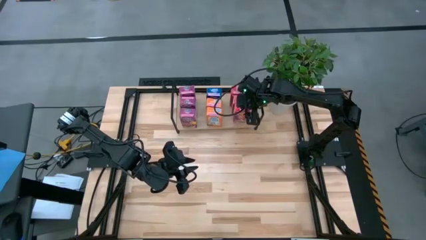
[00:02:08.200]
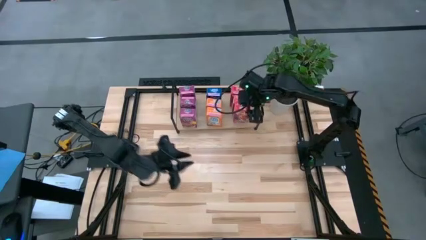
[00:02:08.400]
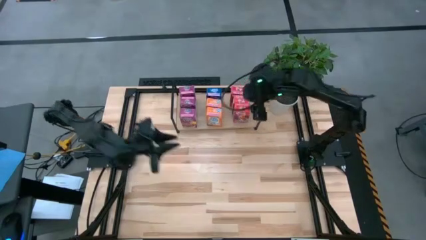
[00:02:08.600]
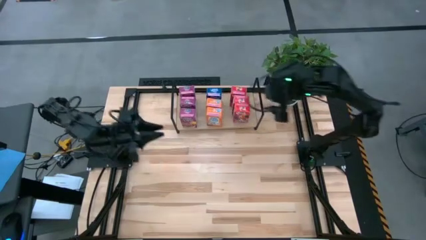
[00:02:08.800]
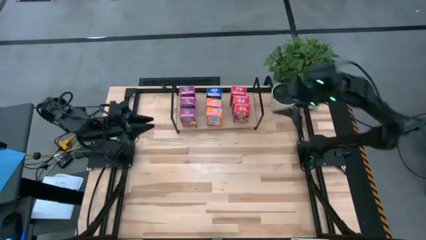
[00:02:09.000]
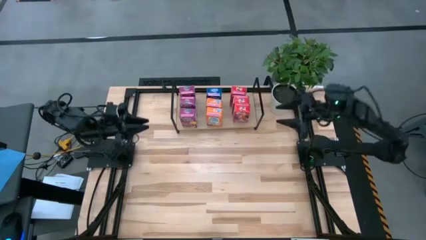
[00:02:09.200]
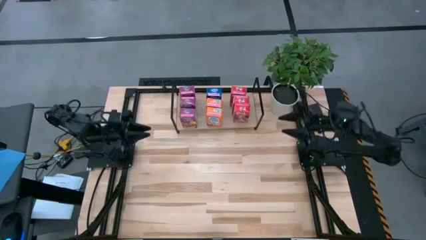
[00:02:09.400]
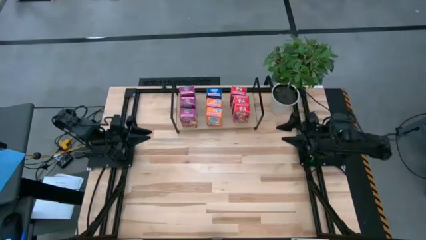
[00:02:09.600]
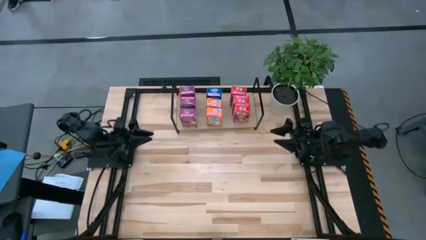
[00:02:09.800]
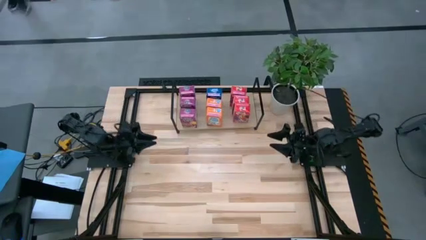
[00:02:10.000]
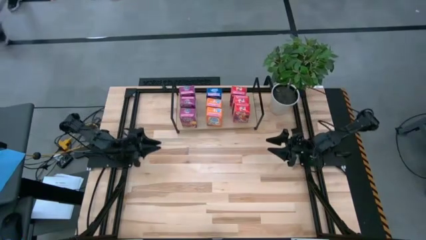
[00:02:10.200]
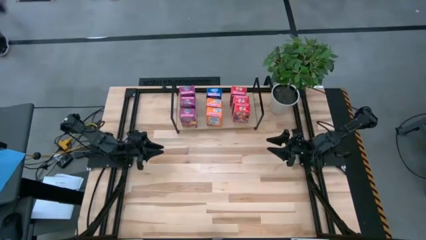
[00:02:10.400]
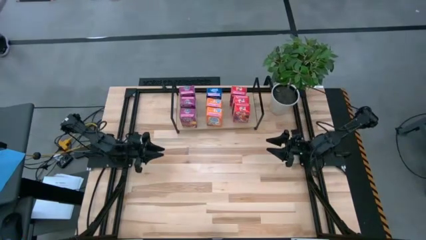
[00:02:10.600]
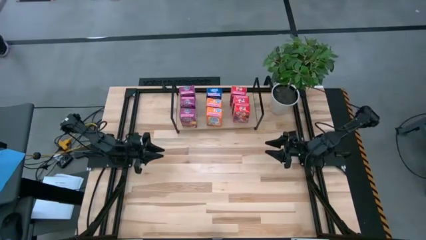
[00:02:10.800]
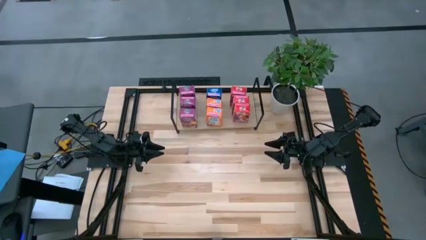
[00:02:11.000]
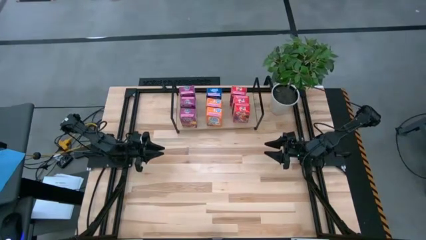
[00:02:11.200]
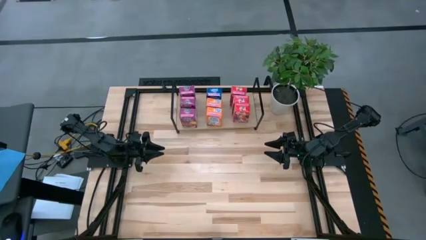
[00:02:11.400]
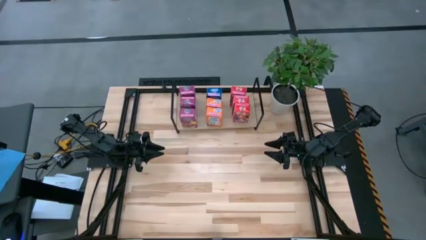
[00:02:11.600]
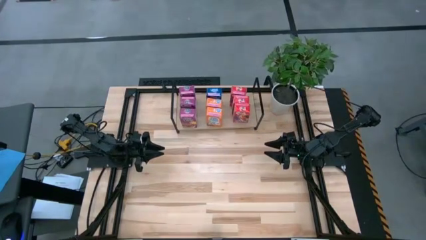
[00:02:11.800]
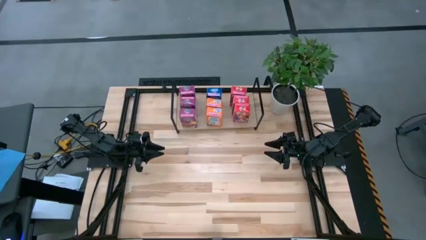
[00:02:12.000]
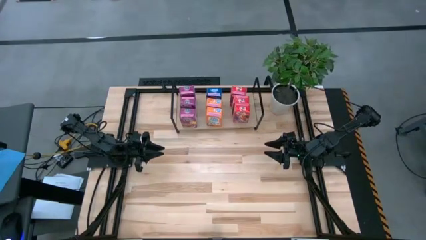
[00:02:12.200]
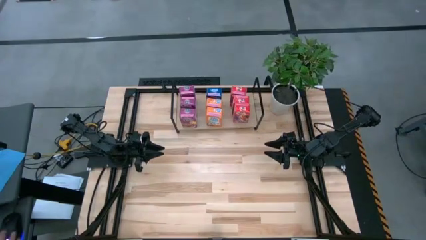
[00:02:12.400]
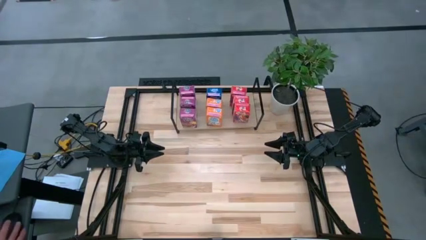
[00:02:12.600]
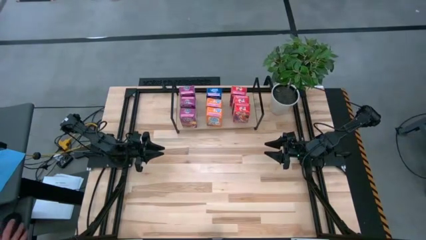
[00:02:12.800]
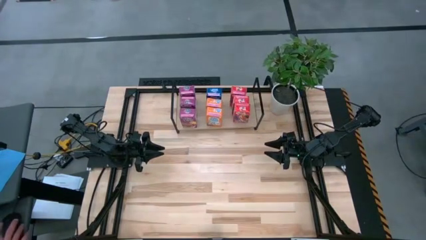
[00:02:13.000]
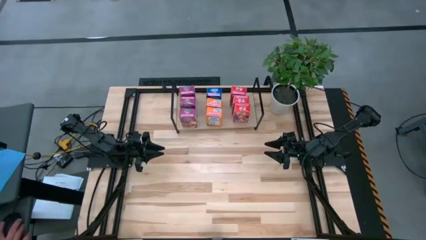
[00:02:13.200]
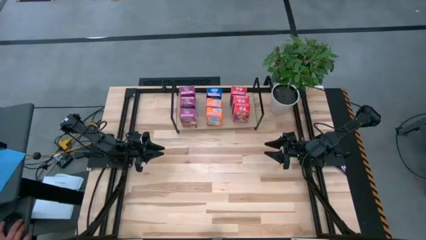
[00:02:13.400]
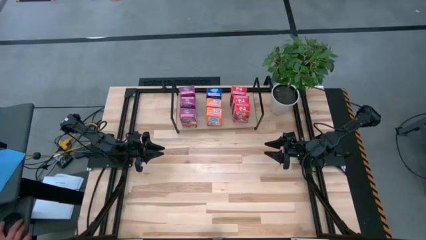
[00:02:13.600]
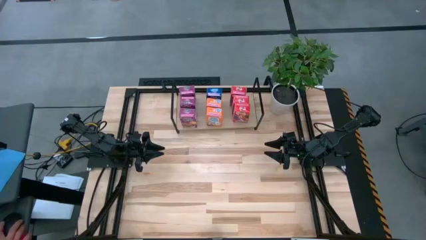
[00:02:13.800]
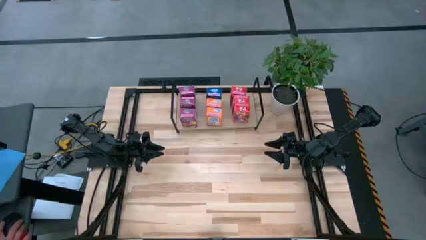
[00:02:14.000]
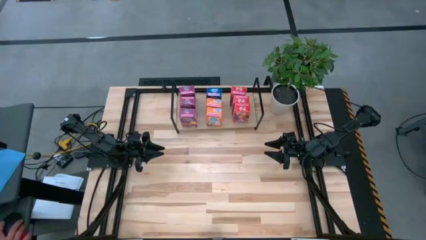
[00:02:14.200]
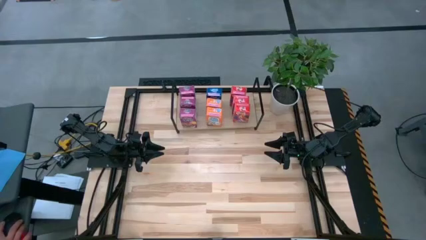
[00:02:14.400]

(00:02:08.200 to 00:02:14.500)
Task: Stack cereal on shelf
Return to Home Position

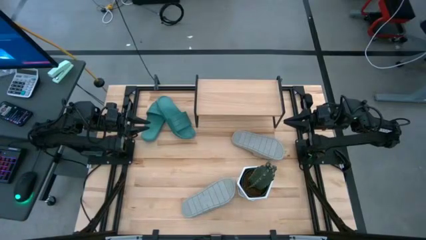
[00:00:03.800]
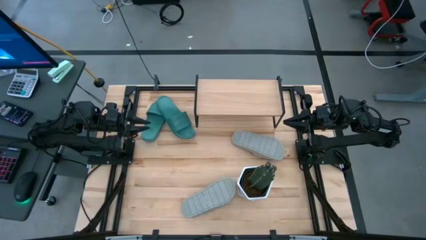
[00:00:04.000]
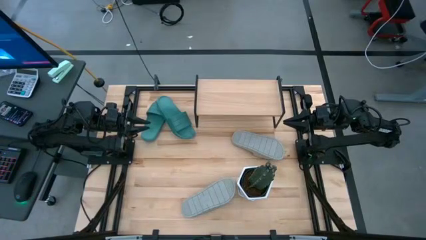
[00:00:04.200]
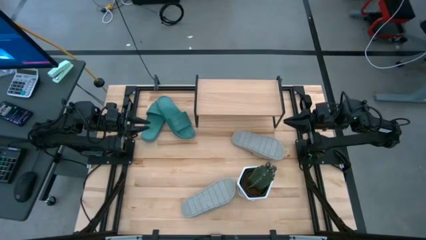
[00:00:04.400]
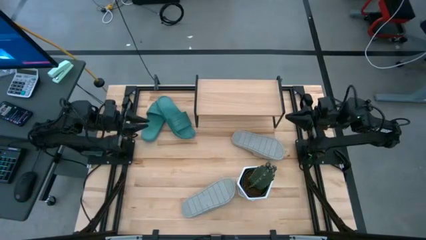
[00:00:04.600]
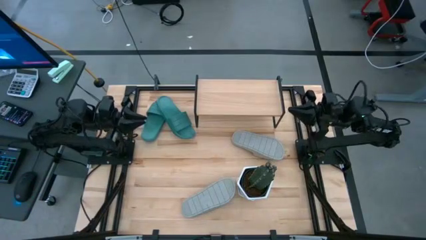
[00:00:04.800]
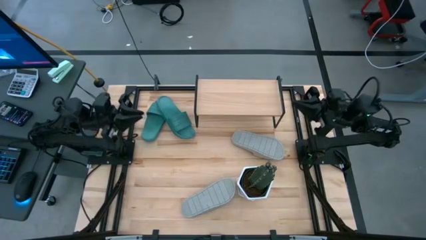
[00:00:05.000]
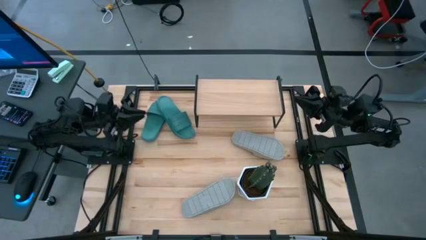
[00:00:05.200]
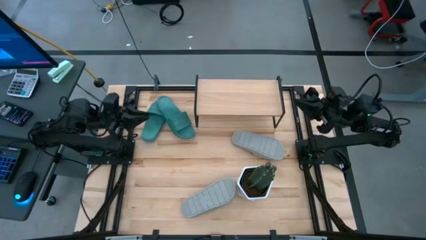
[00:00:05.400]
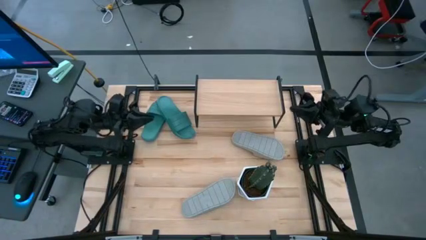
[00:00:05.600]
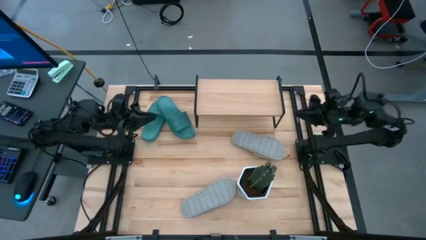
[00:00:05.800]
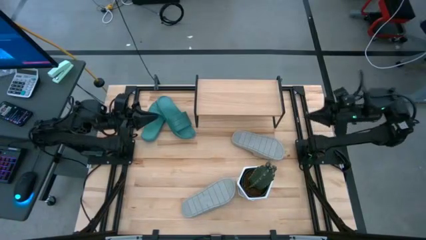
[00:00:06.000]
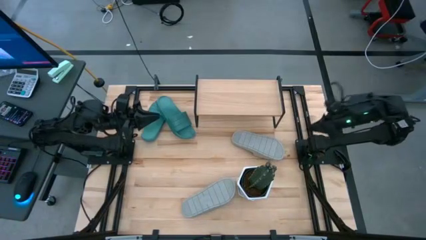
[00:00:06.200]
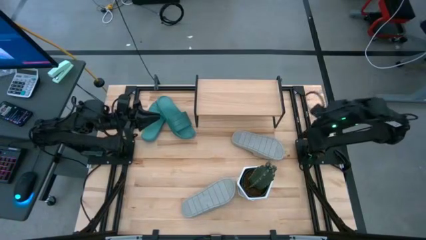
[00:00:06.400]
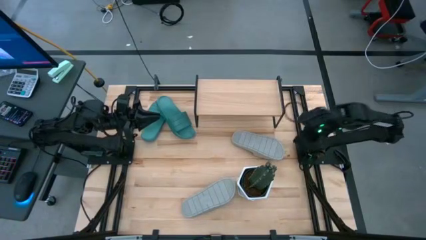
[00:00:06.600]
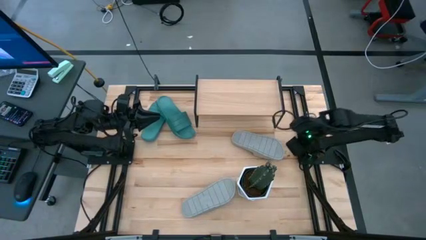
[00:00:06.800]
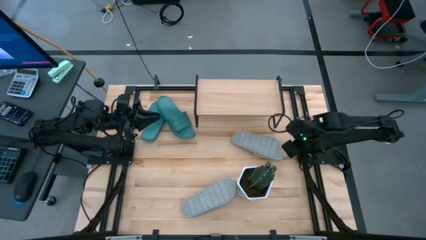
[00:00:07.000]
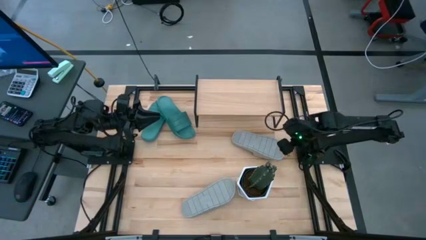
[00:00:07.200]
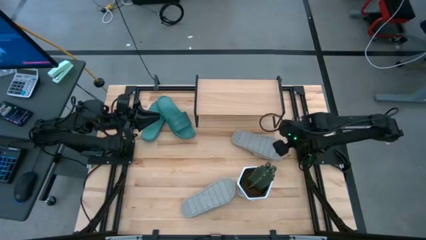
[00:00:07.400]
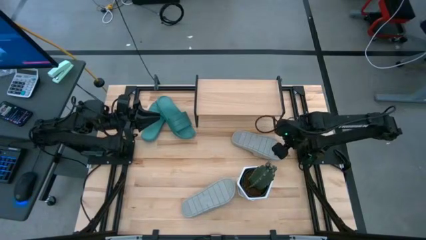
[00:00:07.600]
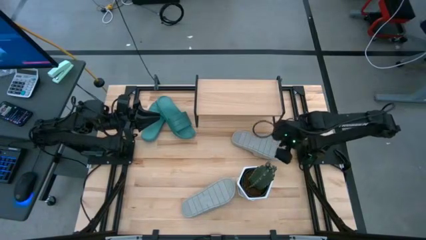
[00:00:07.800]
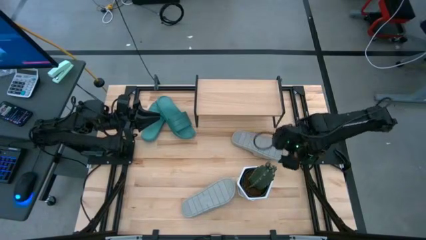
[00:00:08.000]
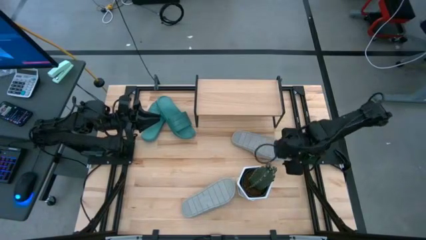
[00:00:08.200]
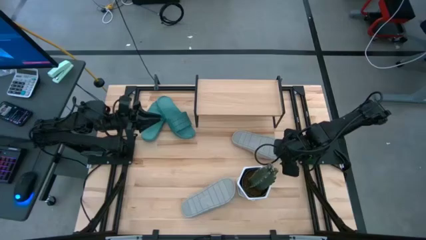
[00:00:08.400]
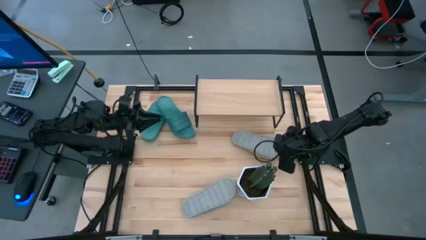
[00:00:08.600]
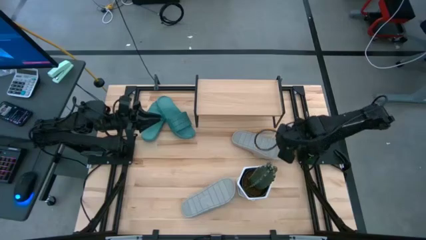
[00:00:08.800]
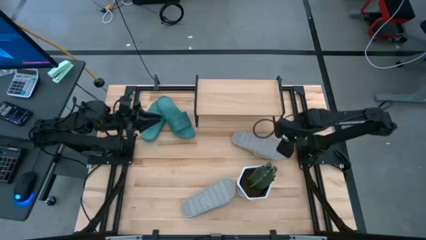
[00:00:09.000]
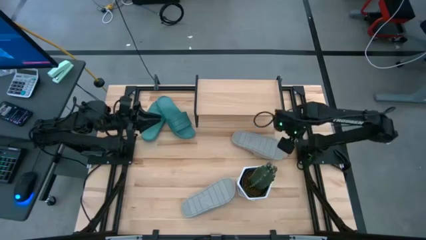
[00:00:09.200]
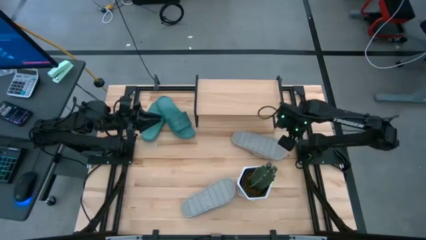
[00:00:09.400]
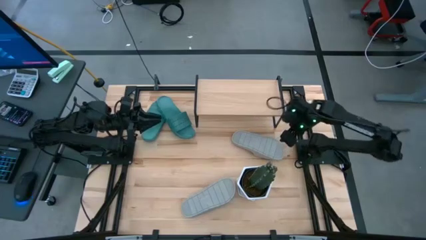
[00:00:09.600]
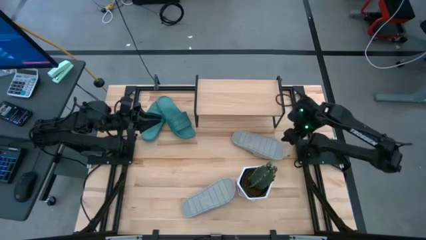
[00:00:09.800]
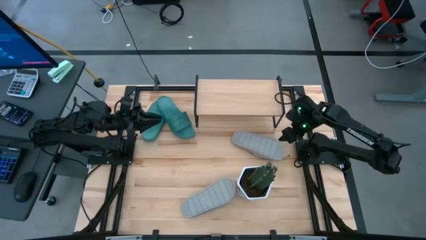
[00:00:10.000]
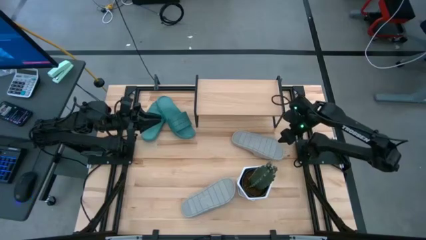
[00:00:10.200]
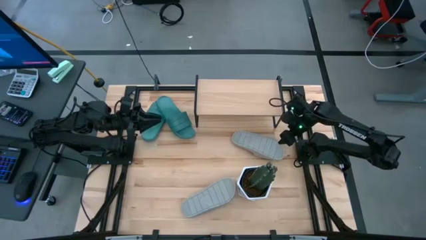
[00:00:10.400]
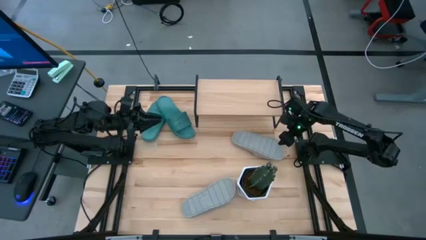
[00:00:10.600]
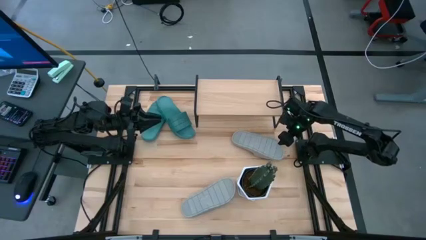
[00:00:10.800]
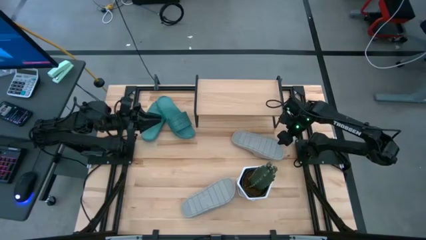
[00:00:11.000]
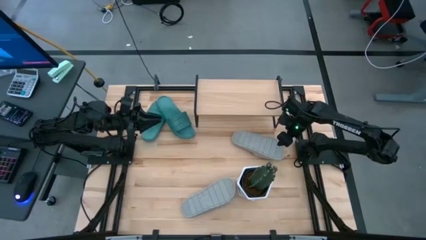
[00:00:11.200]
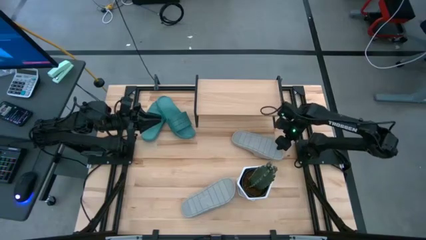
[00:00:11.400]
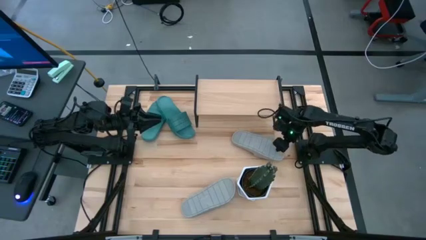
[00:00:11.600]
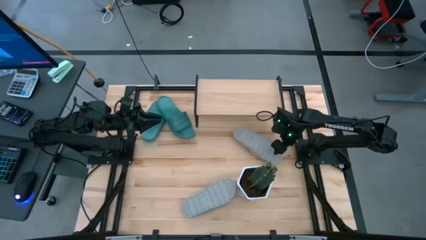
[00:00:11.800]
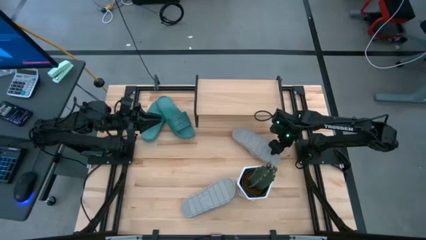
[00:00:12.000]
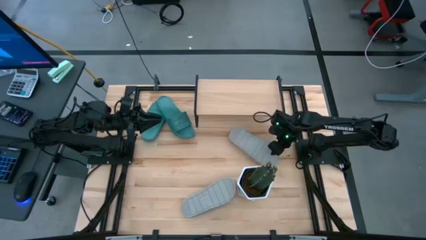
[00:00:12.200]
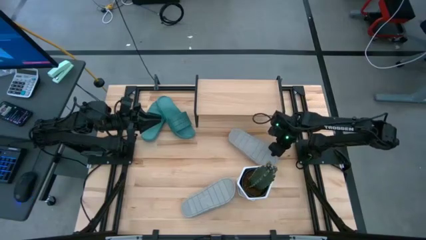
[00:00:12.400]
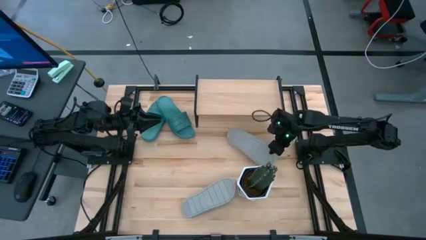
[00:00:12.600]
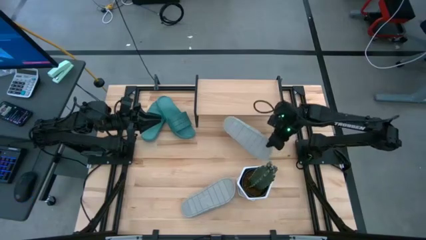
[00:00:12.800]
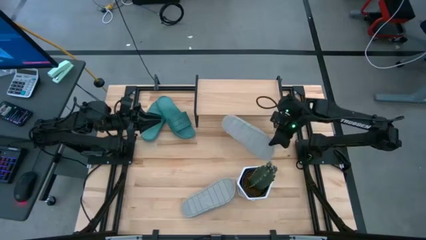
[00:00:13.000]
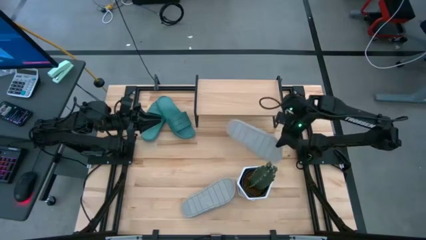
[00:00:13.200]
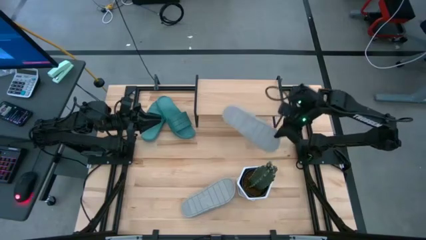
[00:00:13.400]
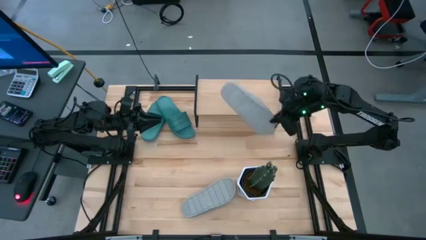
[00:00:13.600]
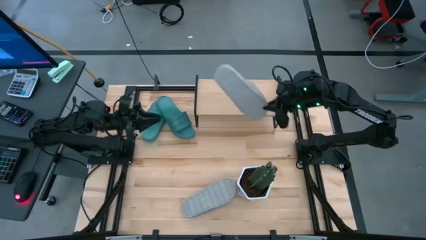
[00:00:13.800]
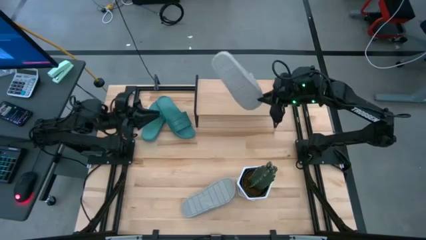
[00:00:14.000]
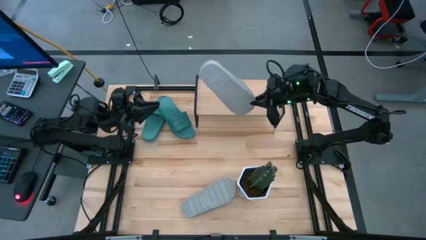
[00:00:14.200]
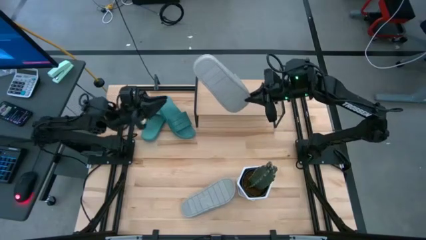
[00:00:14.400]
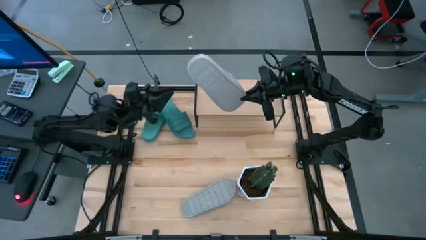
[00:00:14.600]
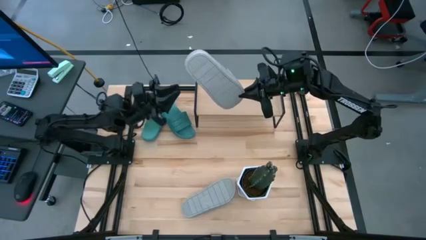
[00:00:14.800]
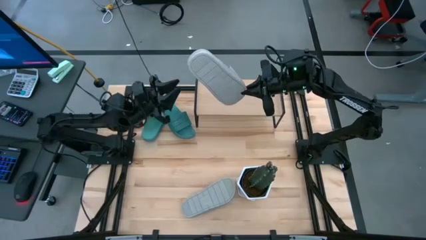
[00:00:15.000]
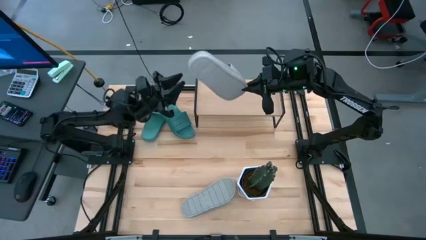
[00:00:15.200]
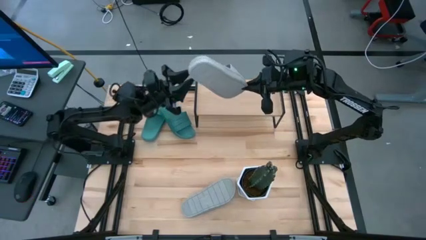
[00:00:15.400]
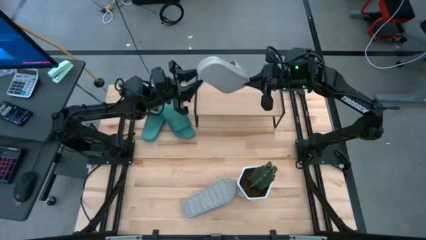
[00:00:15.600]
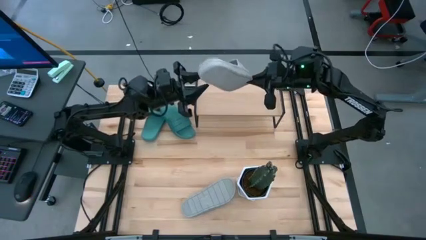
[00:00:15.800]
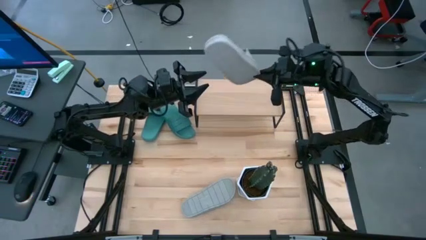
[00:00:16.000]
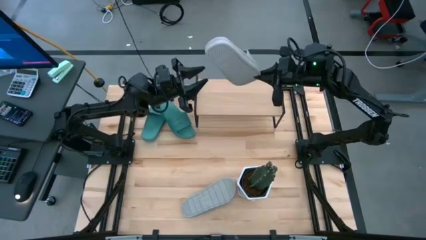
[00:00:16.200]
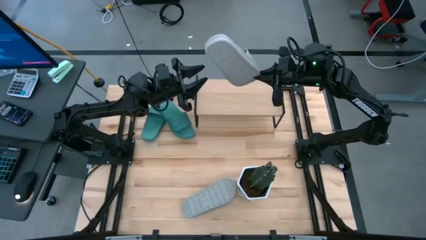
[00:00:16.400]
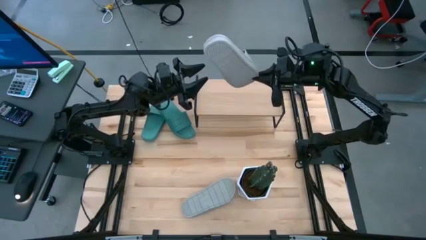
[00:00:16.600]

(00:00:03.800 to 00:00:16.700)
Task: Pick and place slides into the shelf
Put the right gray slipper on the shelf
